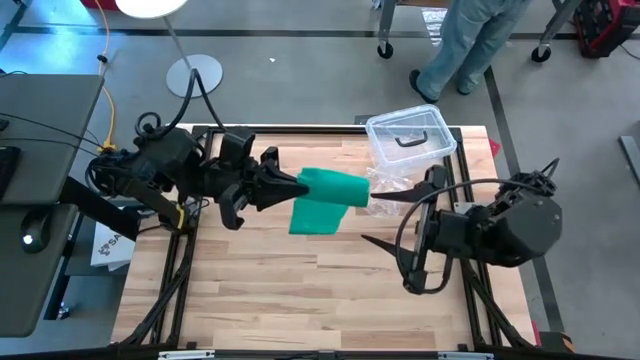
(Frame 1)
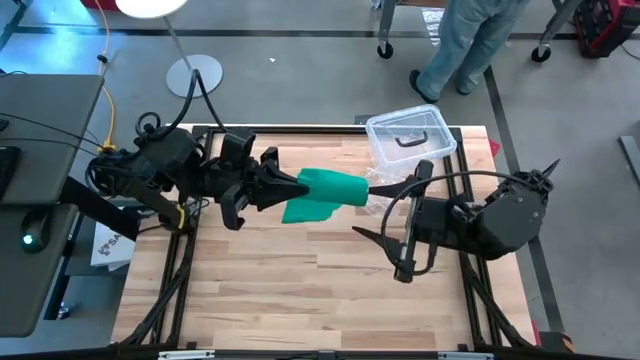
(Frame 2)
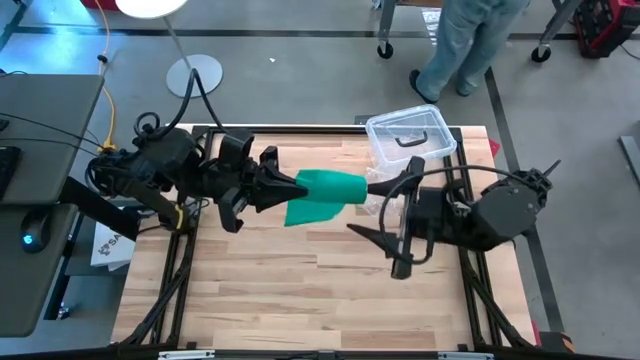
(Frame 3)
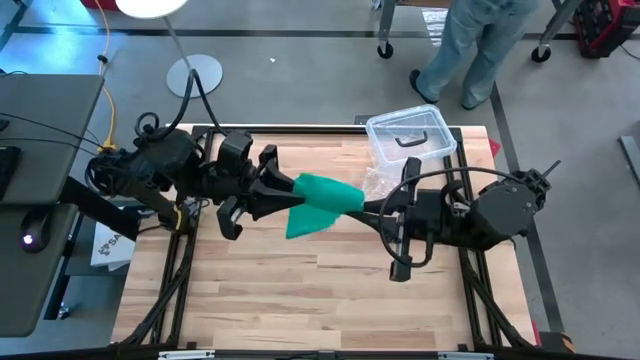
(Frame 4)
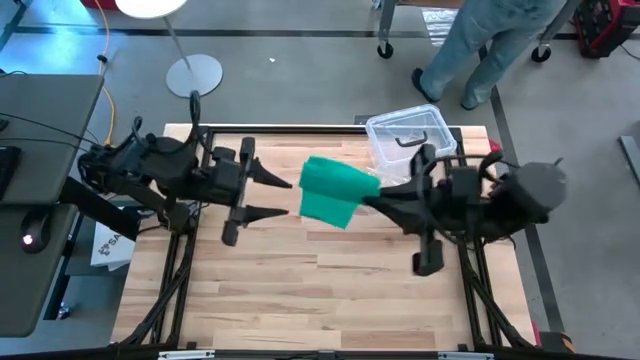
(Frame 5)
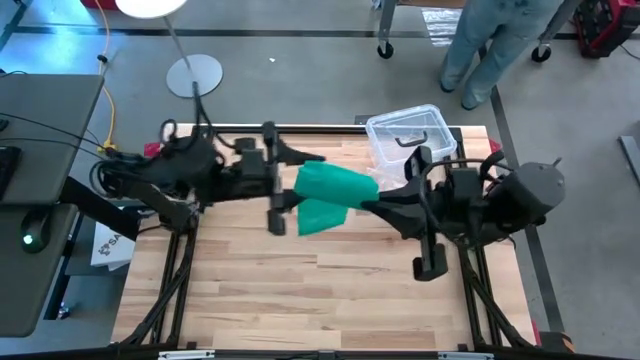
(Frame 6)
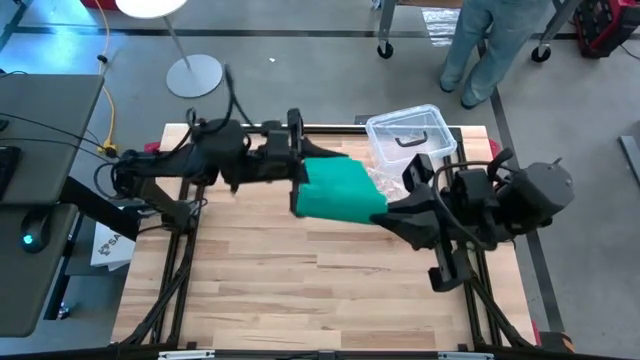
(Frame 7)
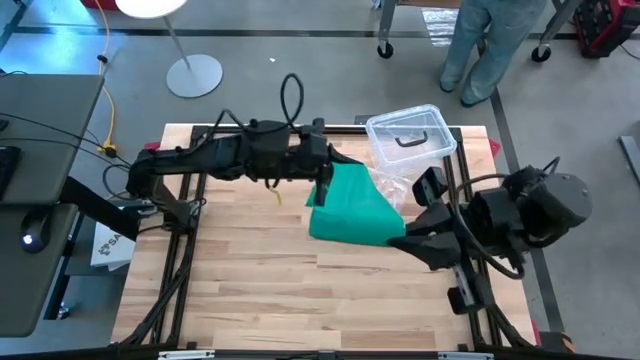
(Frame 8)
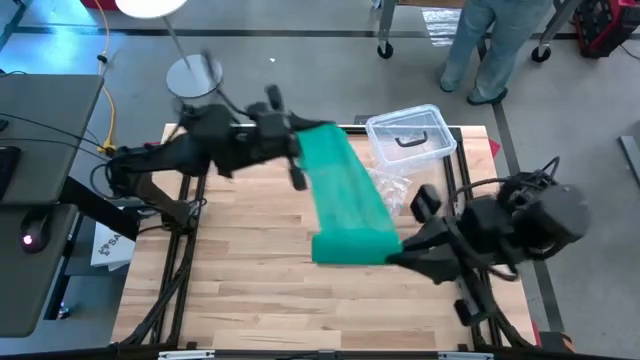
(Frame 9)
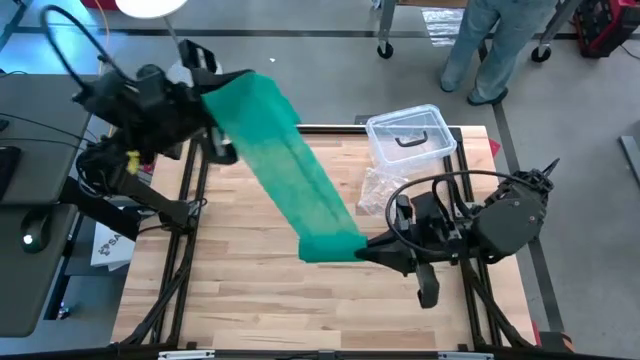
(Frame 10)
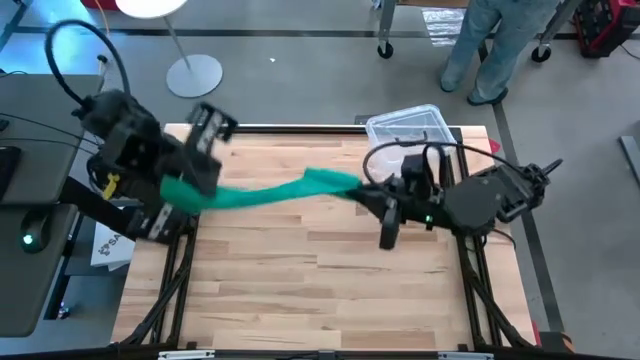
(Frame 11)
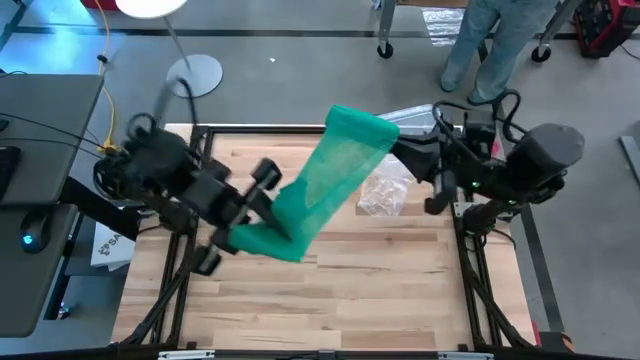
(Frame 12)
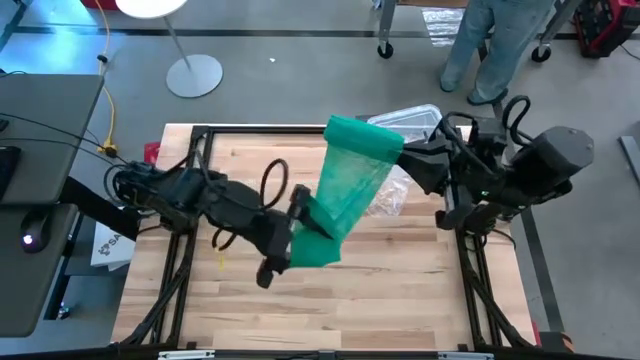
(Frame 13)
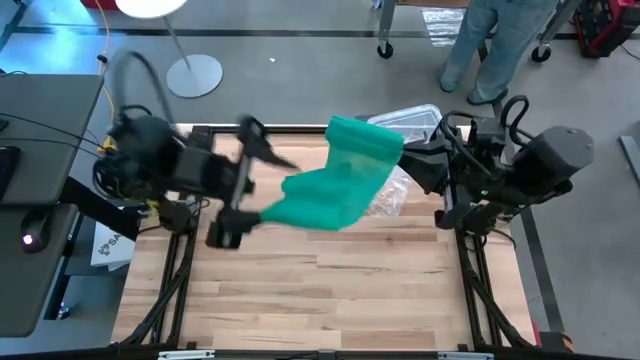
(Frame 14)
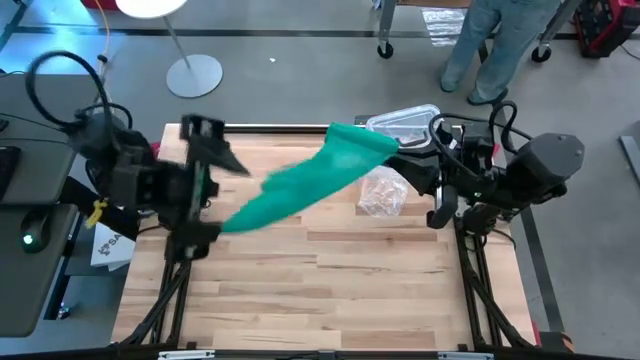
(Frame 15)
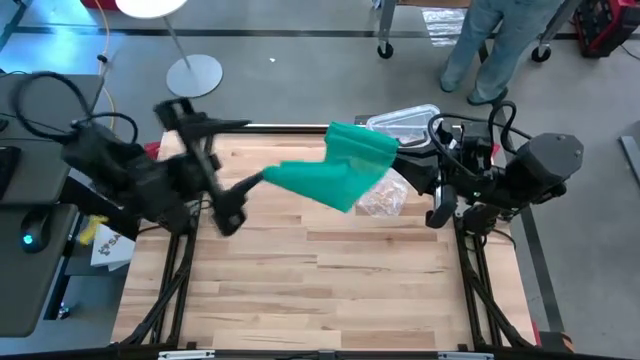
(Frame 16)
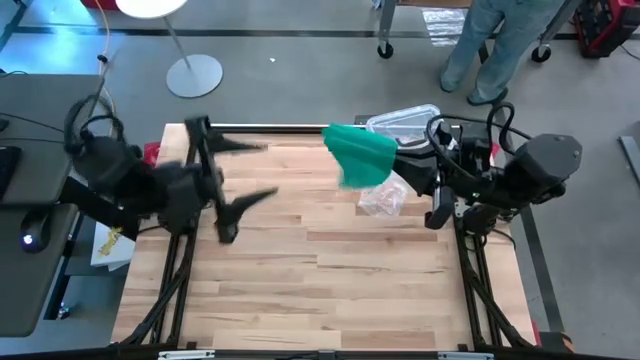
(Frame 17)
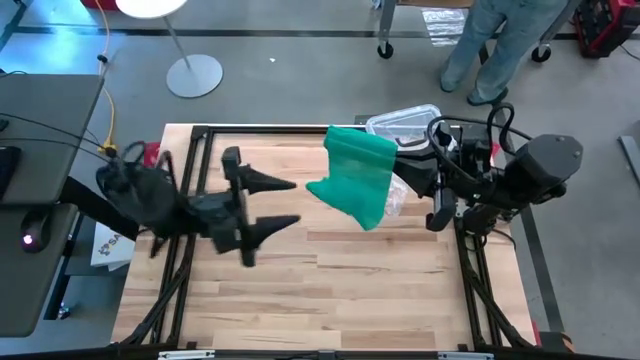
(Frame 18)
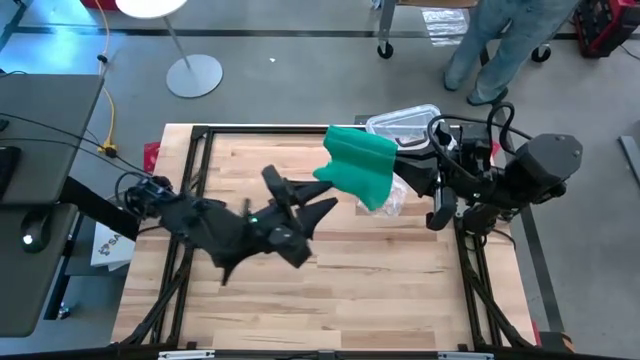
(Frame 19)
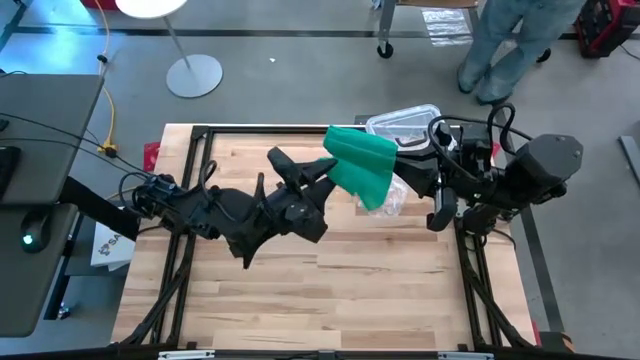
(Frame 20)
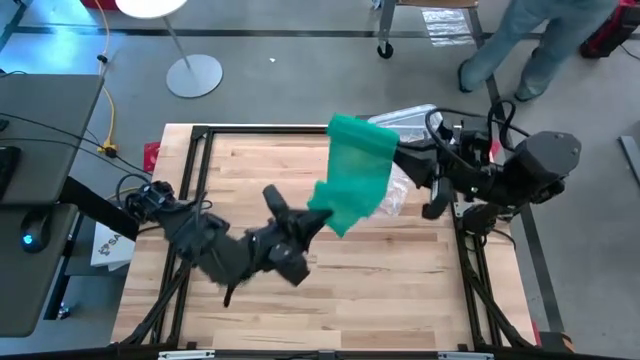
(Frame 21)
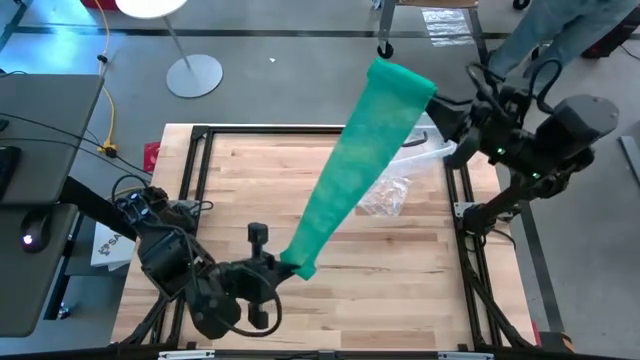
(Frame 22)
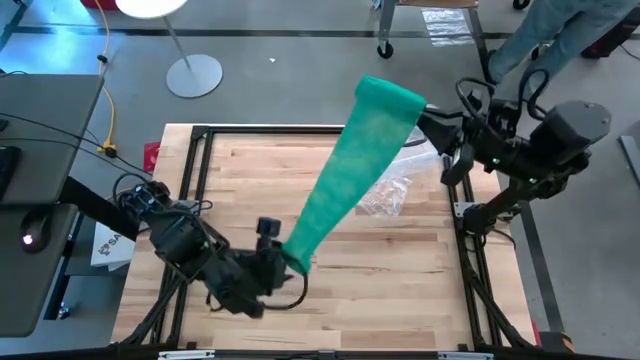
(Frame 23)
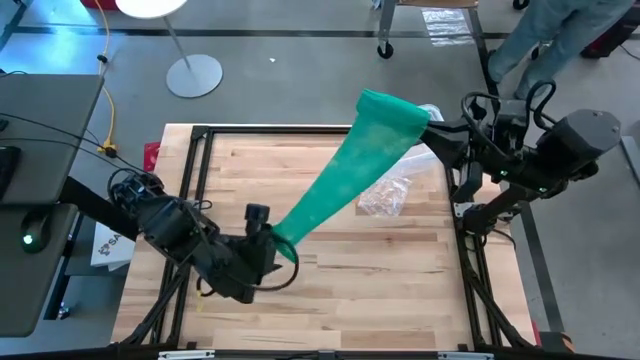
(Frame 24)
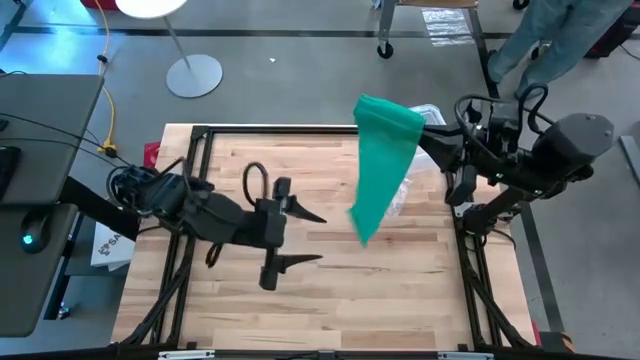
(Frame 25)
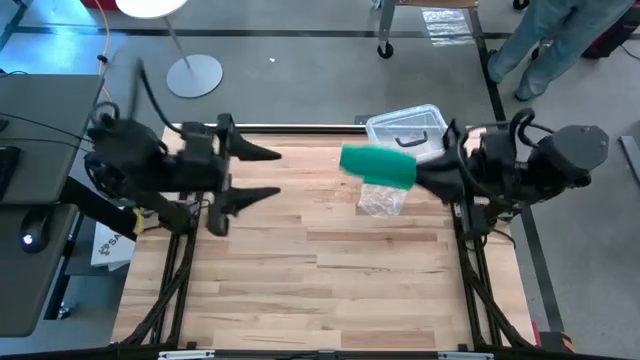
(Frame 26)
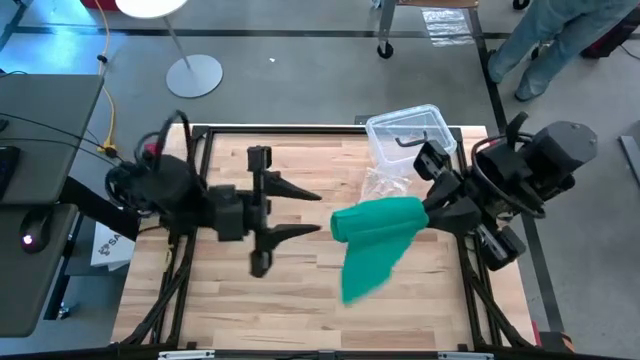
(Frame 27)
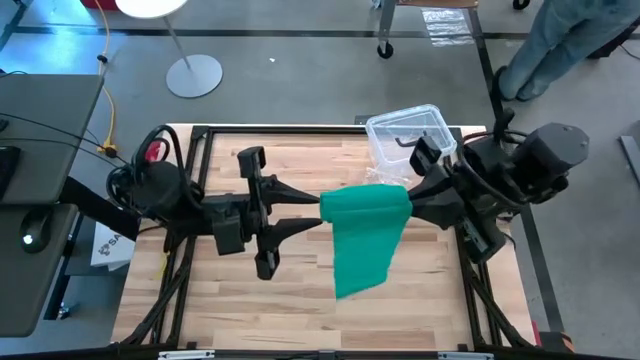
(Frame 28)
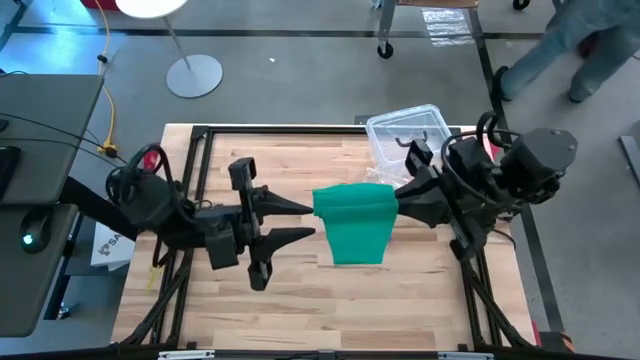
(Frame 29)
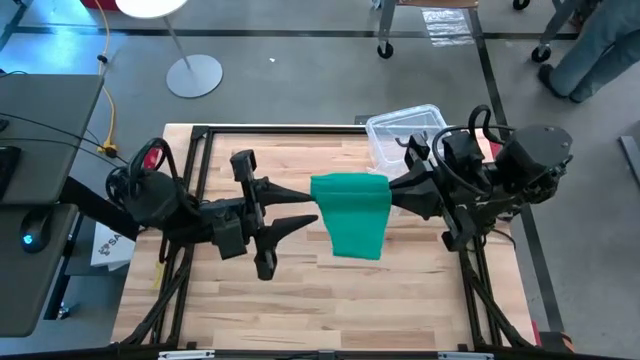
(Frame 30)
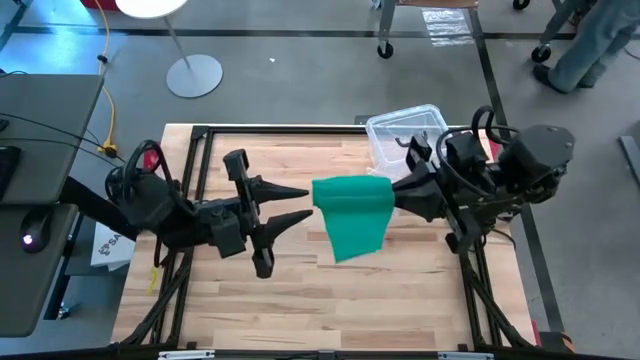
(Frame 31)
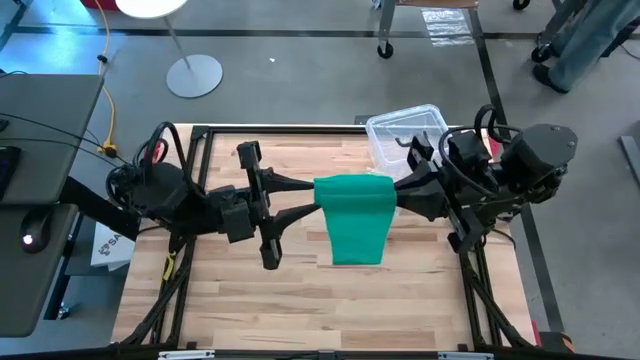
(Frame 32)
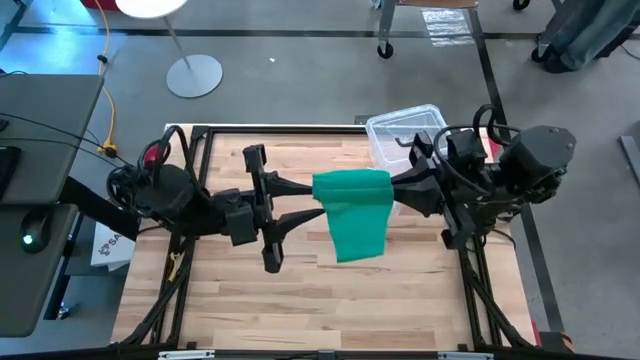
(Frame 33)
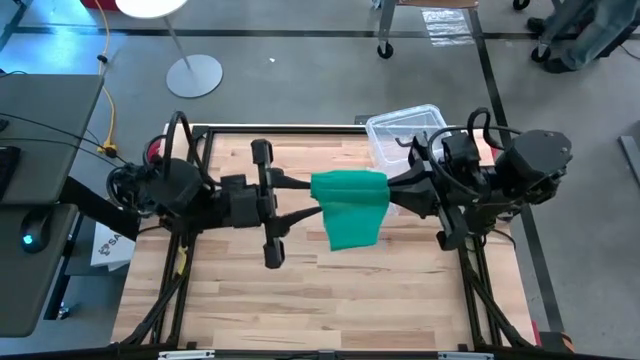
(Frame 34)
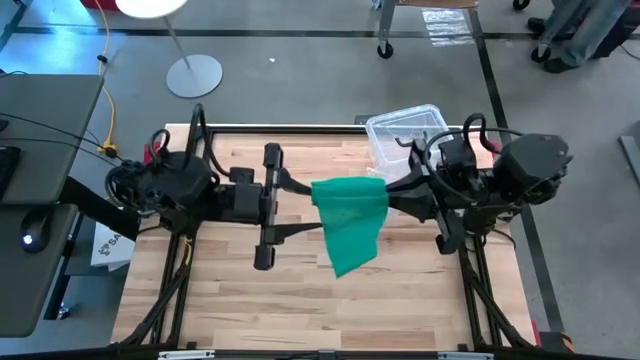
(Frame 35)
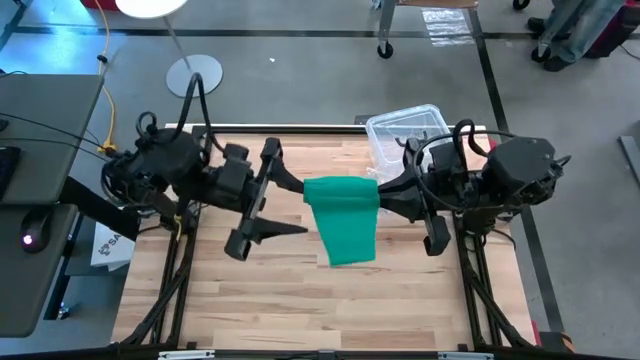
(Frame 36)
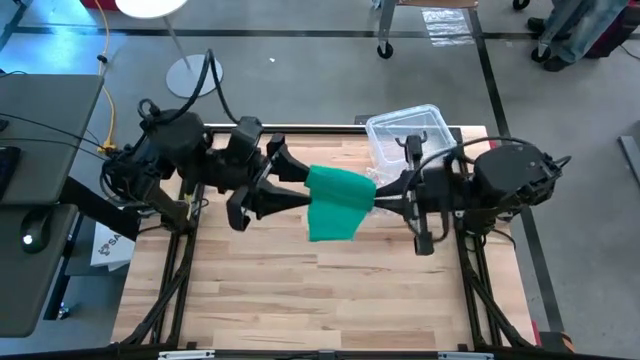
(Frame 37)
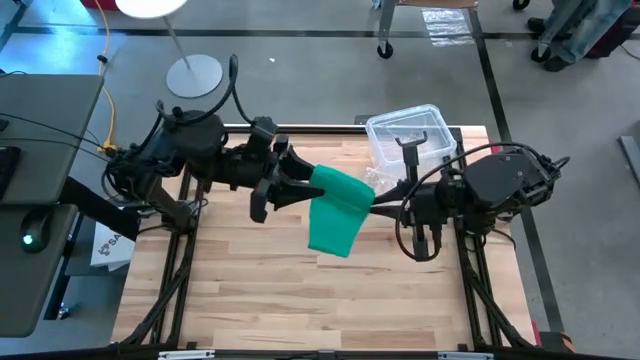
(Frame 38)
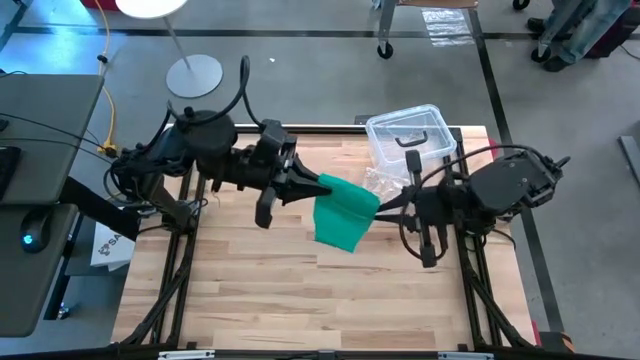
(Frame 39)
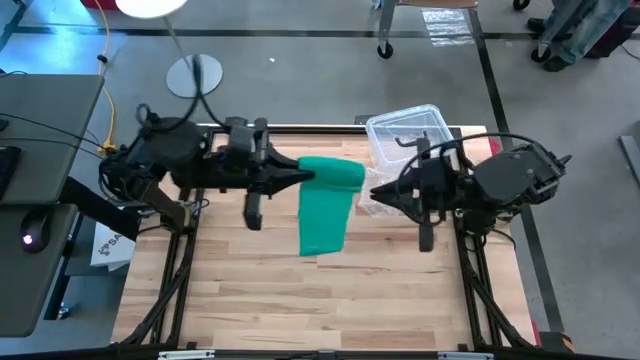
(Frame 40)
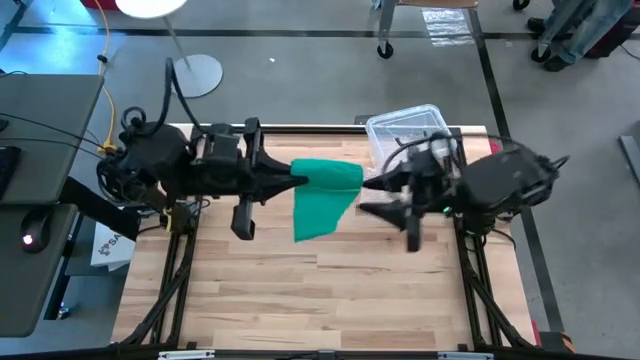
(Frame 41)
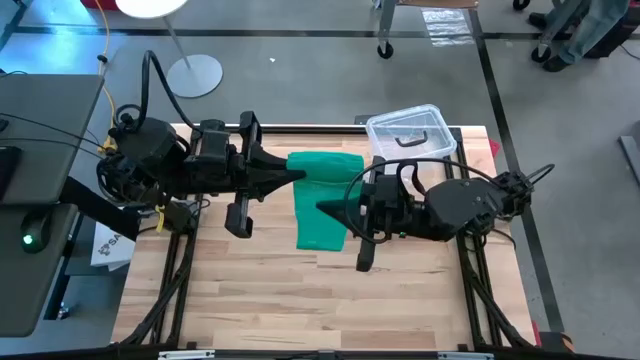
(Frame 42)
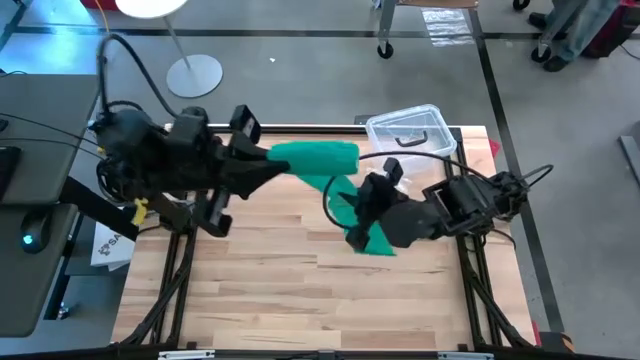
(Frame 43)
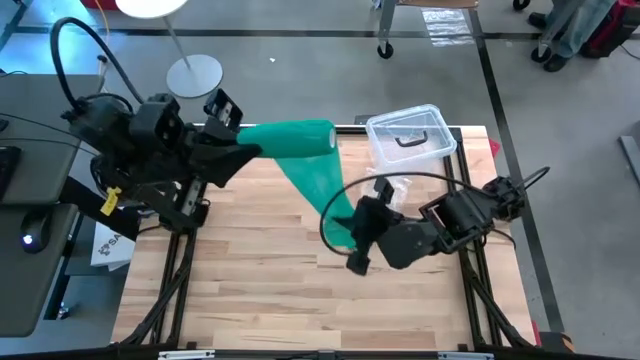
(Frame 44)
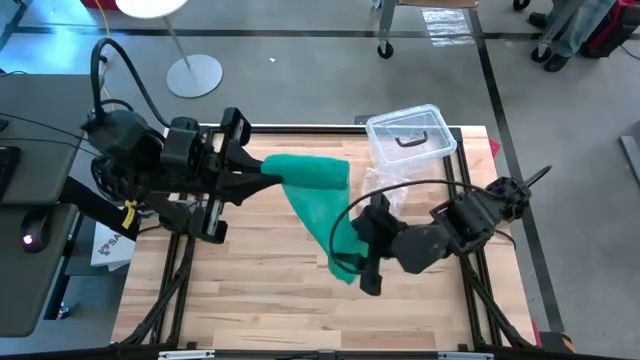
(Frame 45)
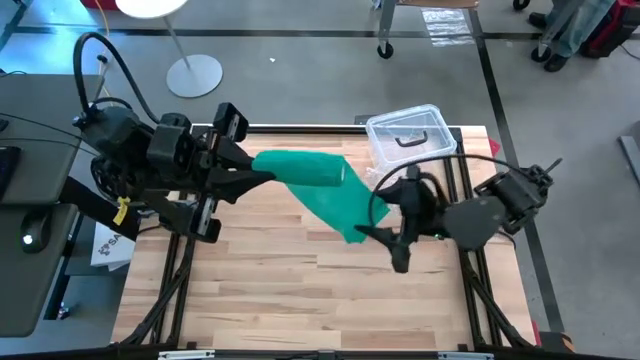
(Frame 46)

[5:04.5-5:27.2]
Task: Roll bandage
Roll the green bandage
